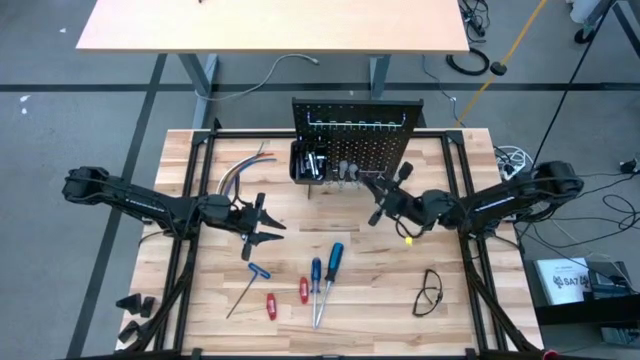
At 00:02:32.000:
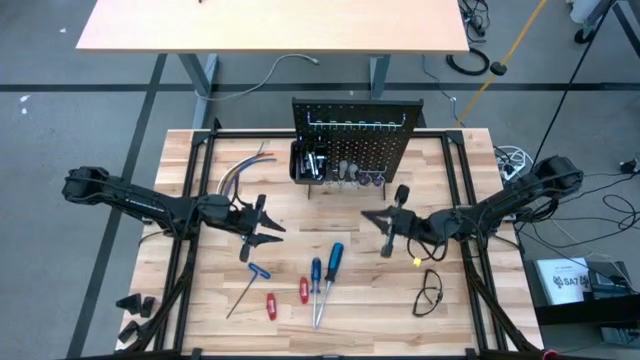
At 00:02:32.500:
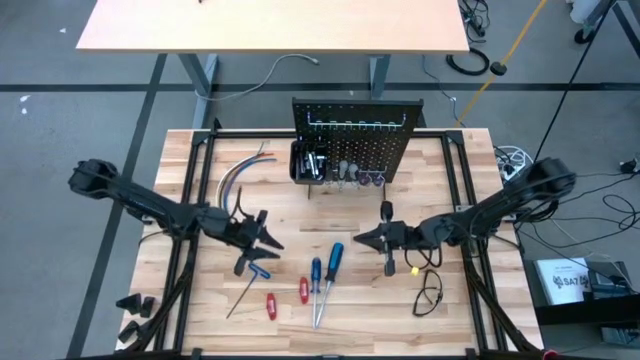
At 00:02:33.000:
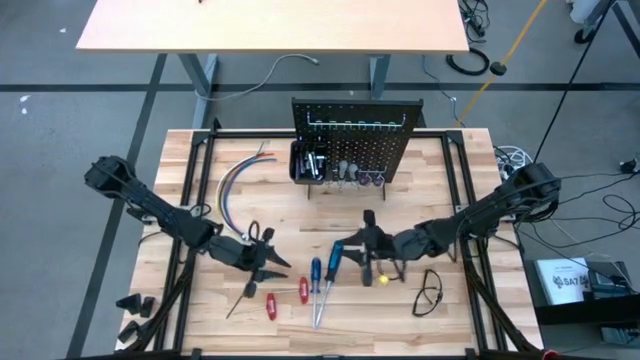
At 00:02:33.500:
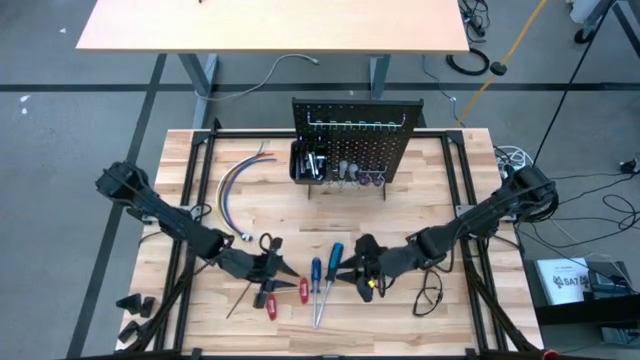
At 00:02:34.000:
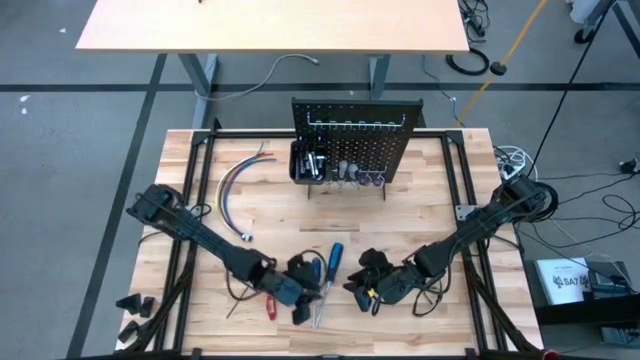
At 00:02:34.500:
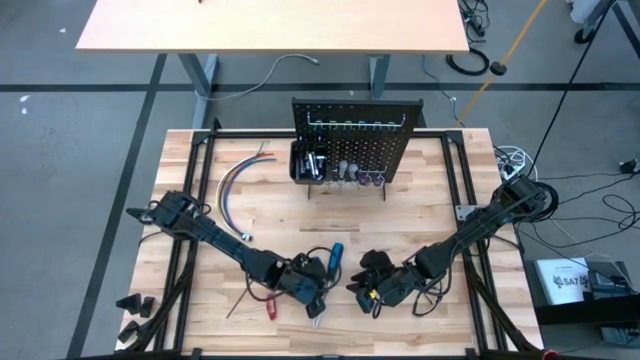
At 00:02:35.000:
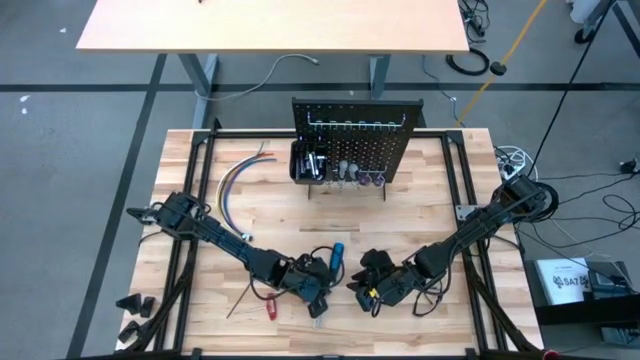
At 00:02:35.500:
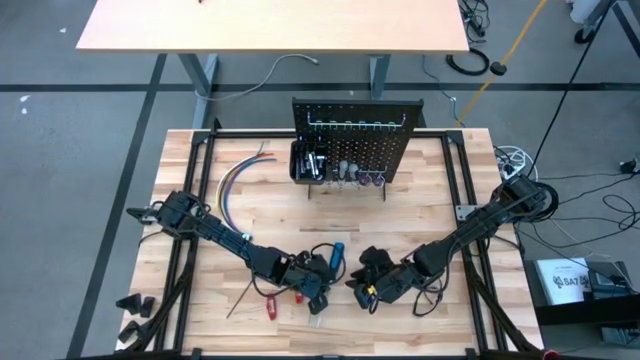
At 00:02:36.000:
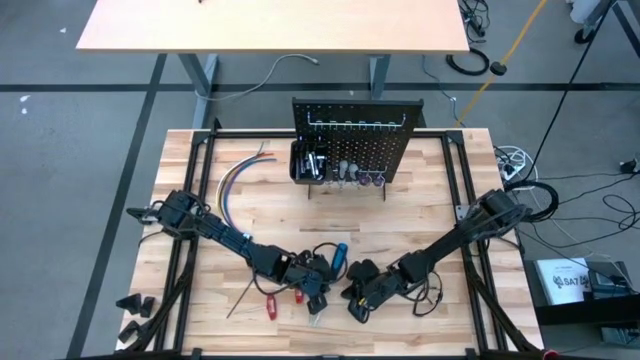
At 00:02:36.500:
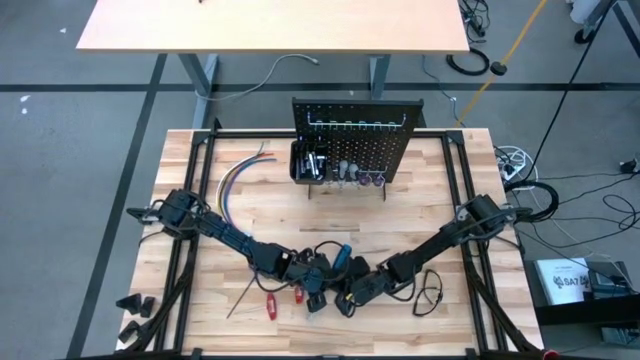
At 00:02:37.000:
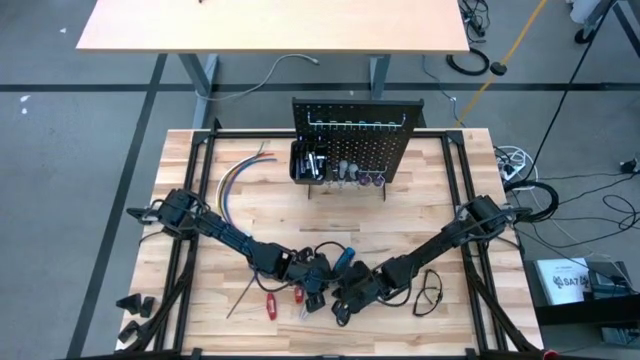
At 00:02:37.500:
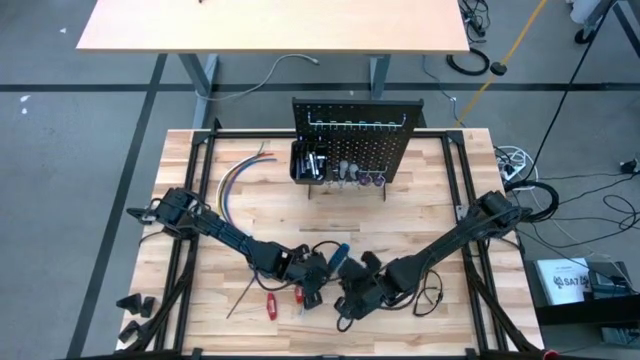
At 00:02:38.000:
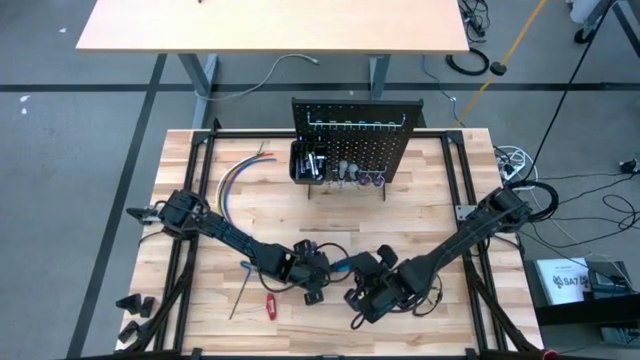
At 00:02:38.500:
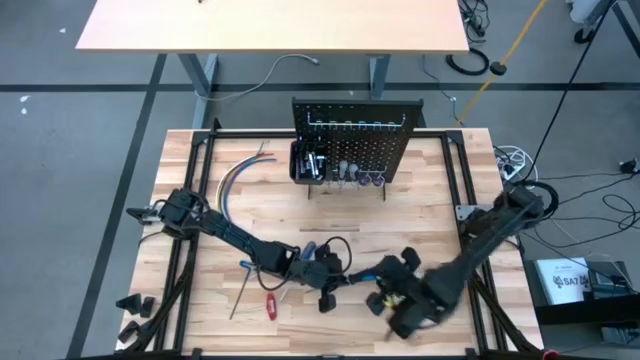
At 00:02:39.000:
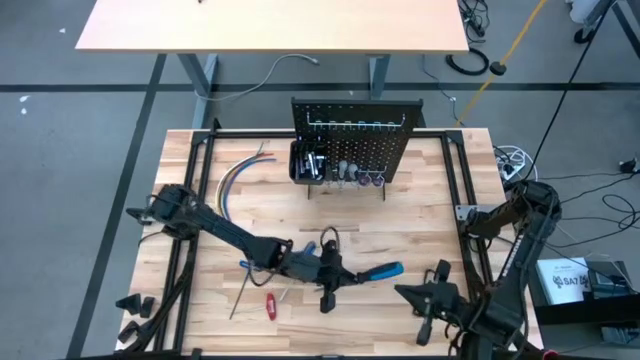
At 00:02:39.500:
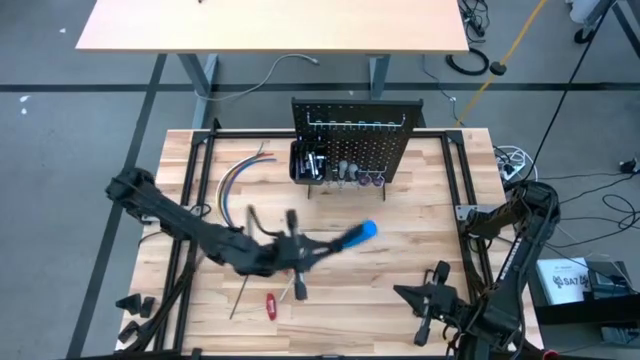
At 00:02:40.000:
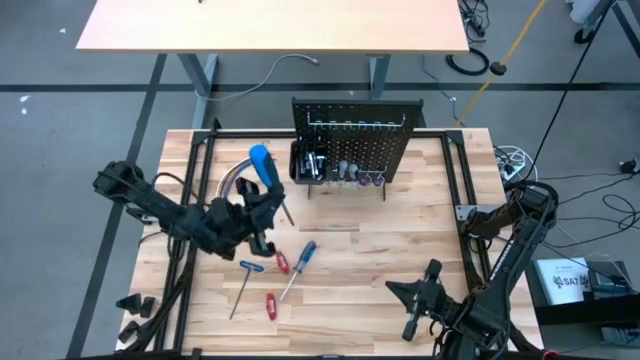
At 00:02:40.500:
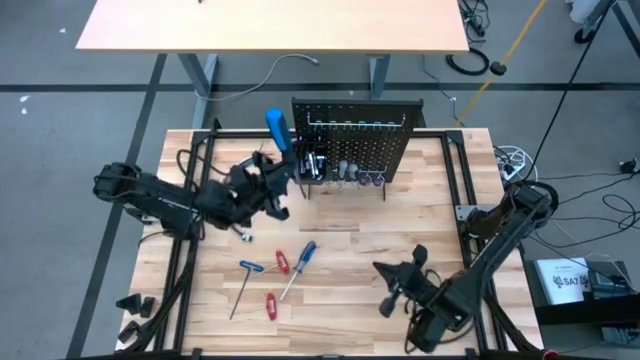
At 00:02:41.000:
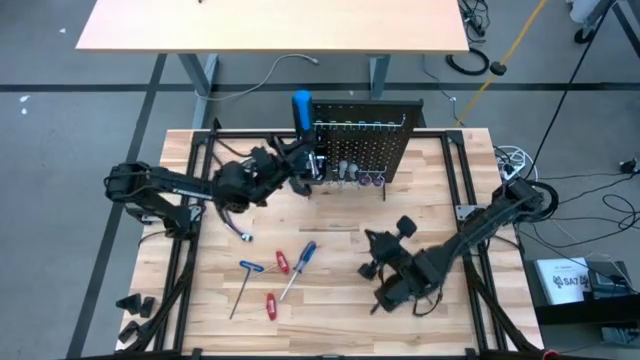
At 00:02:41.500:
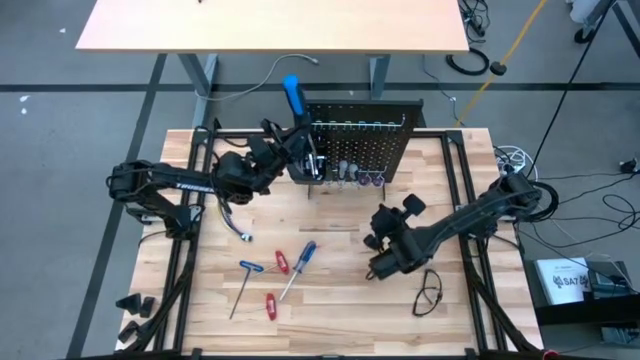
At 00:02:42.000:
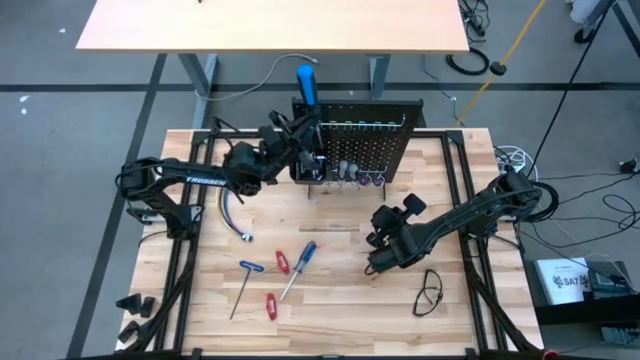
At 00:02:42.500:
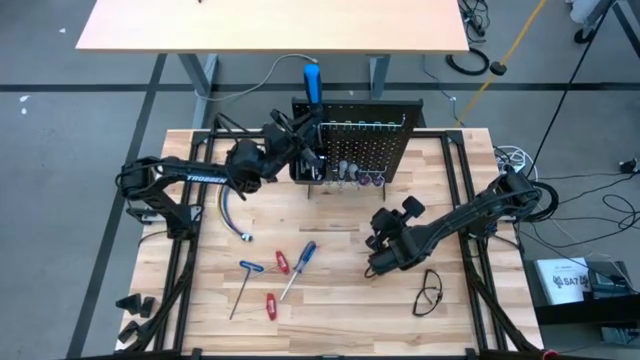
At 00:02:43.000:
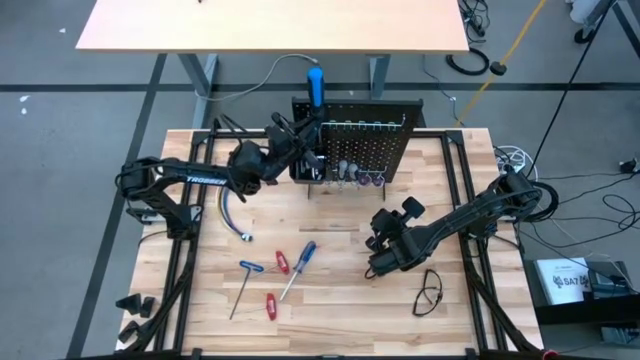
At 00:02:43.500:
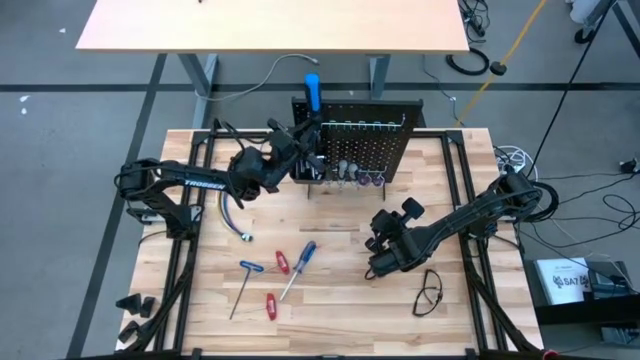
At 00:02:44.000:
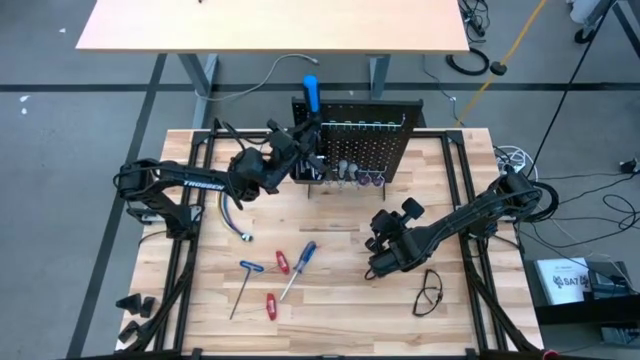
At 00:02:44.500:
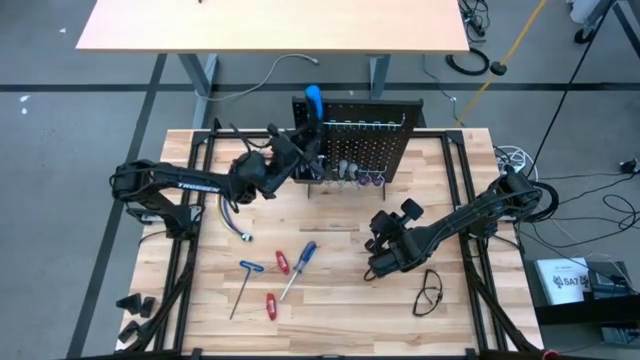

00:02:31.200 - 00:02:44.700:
Task: Hang tools onto peg board
Hang the blue flat screwdriver on the peg board

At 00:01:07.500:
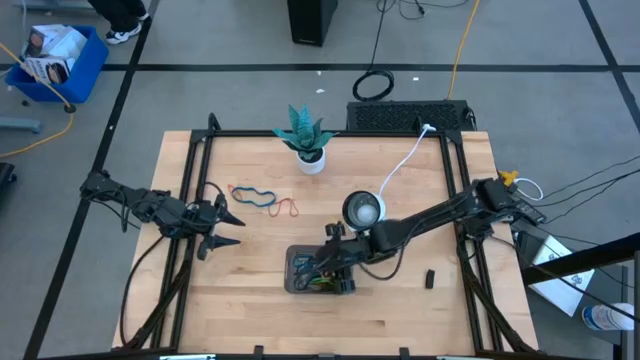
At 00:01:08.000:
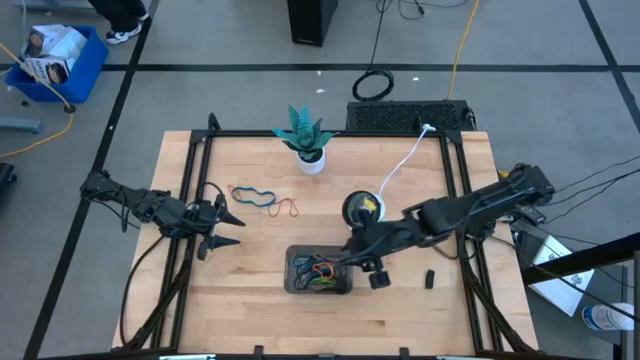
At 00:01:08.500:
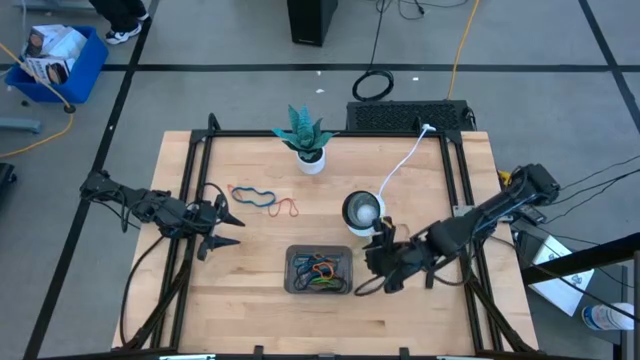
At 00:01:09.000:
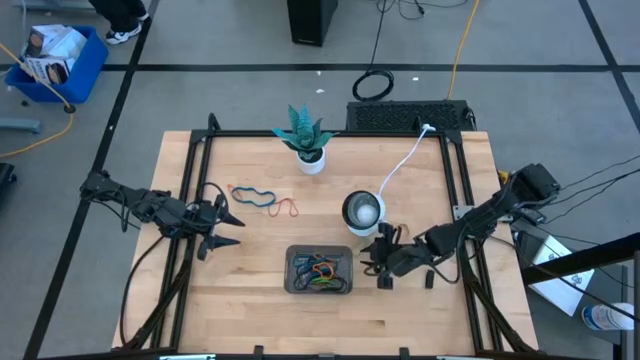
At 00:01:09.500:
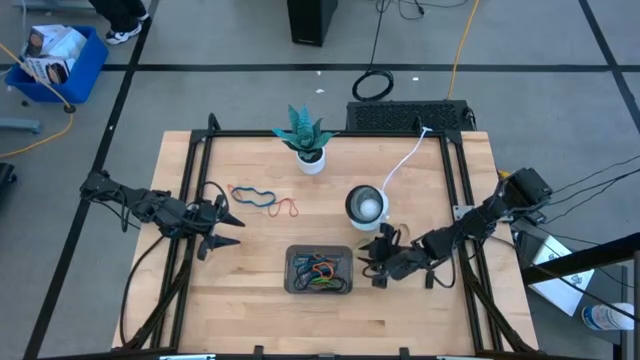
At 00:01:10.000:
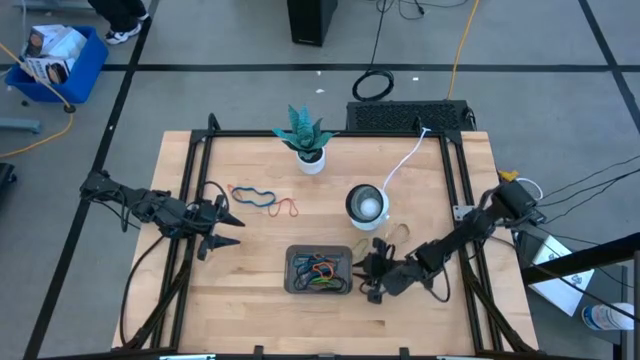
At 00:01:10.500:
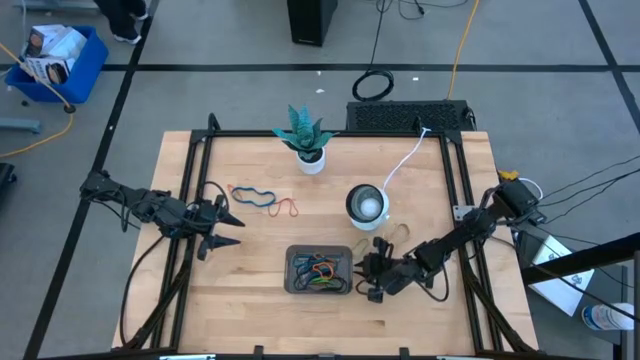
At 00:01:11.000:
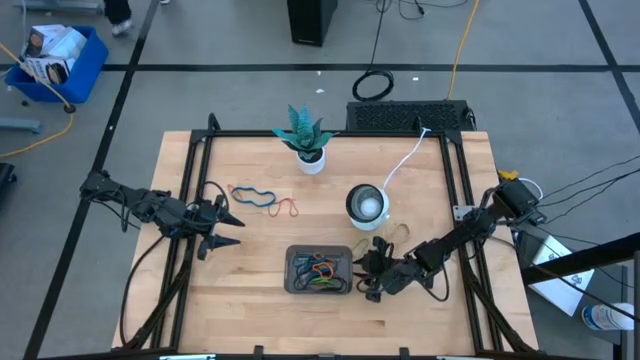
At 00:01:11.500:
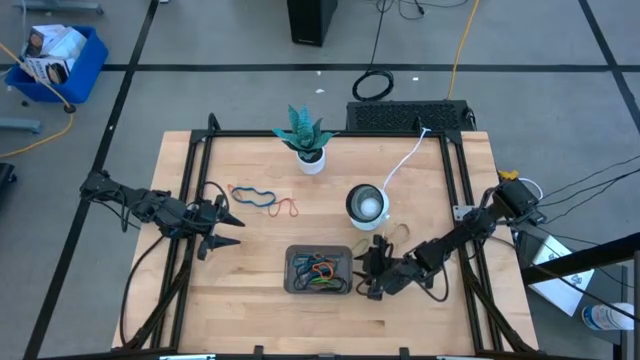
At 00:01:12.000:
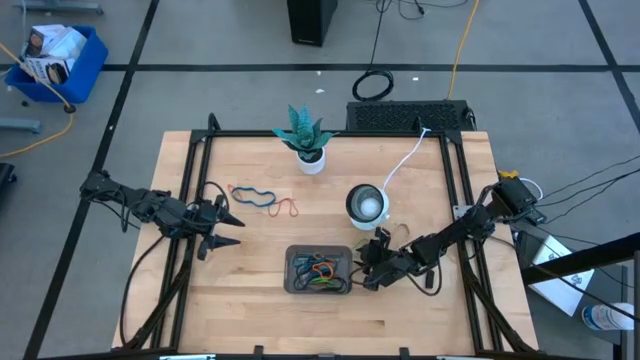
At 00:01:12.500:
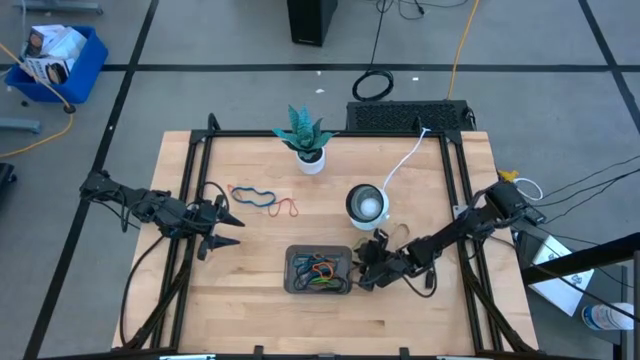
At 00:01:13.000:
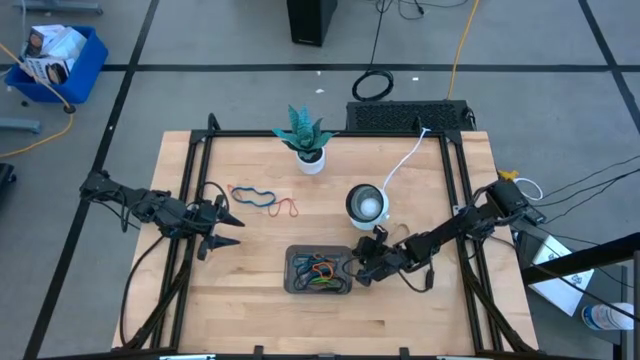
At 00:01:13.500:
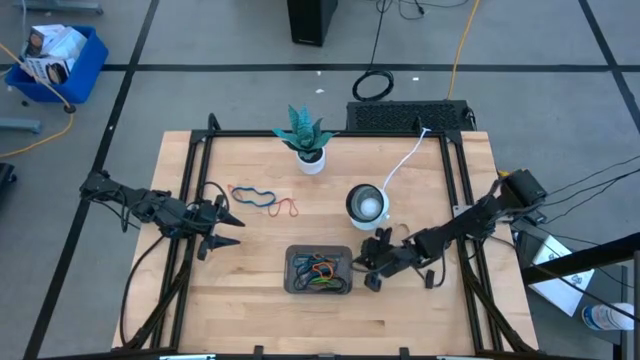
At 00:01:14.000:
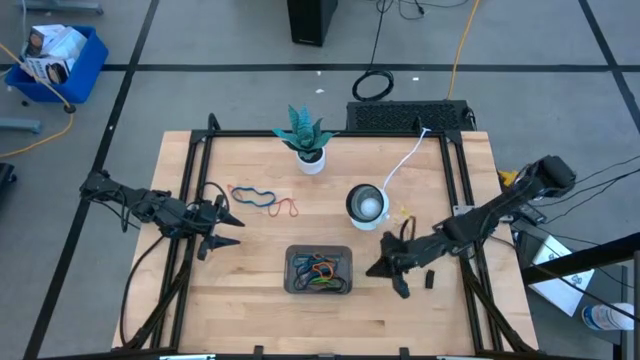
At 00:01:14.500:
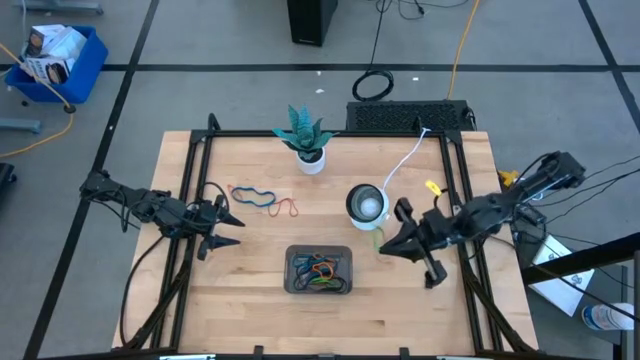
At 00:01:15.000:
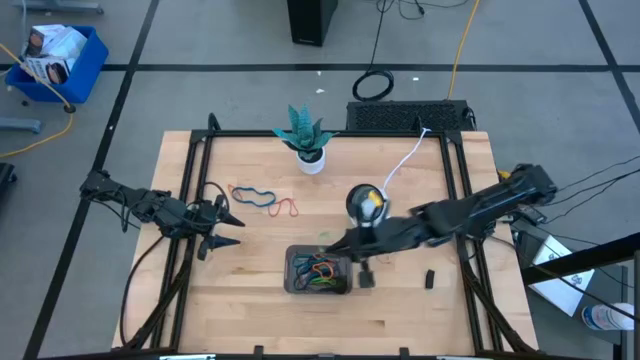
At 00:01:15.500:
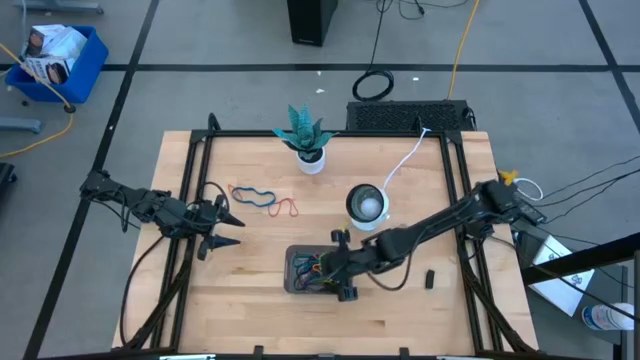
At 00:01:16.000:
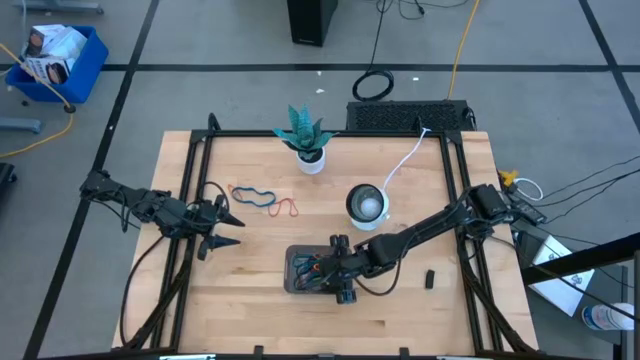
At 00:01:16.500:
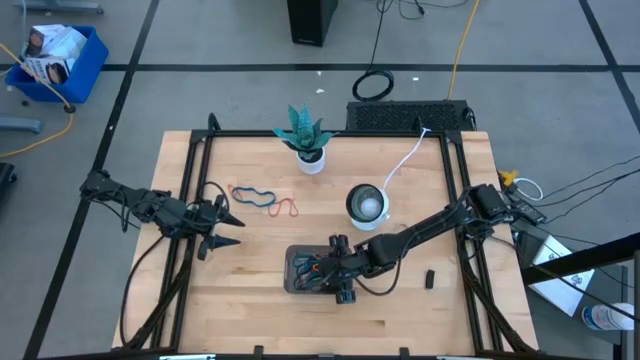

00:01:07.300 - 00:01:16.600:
Task: Pick and place rubber bands into bin
Put the green rubber band into the gray bin
